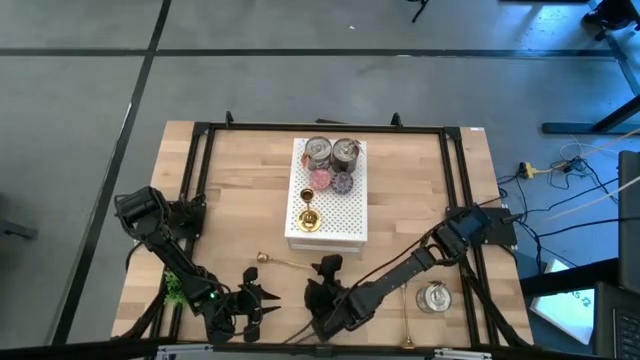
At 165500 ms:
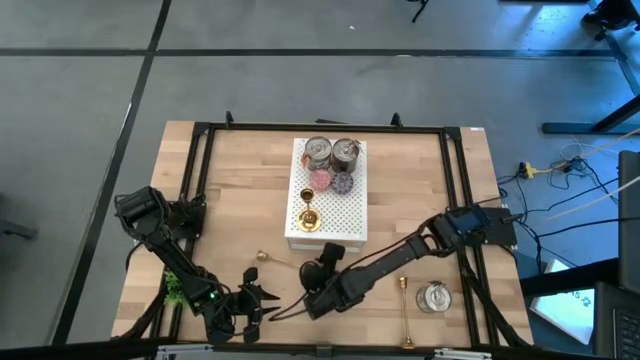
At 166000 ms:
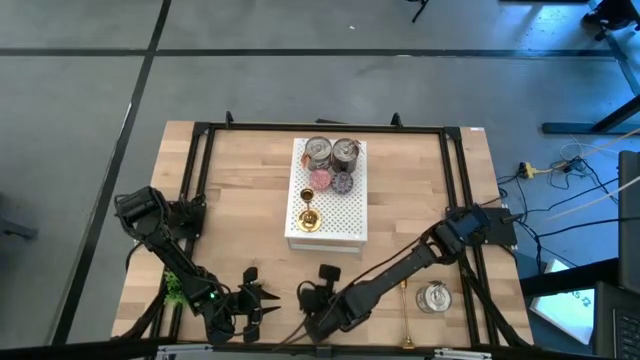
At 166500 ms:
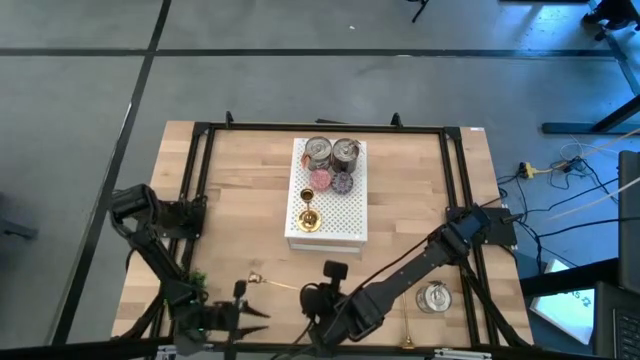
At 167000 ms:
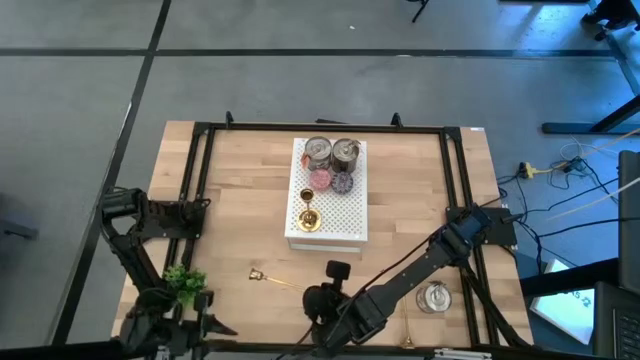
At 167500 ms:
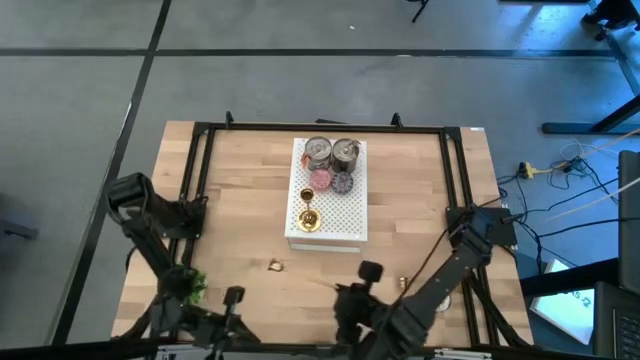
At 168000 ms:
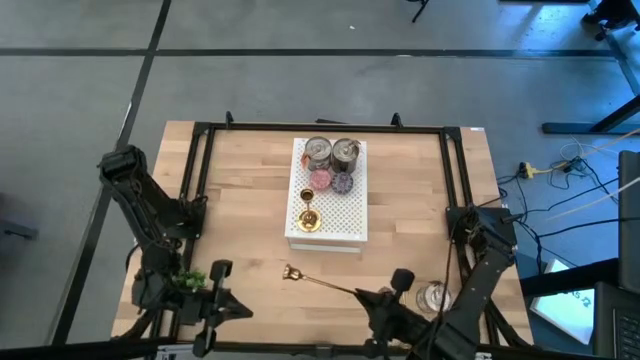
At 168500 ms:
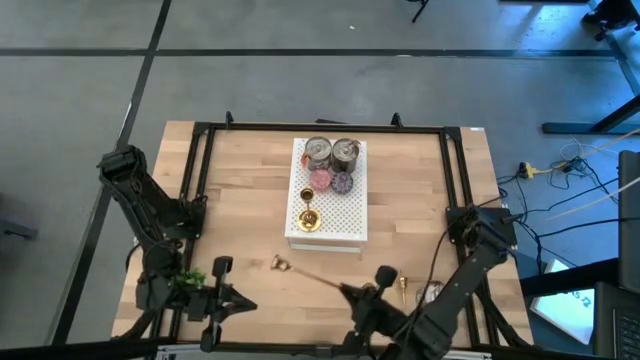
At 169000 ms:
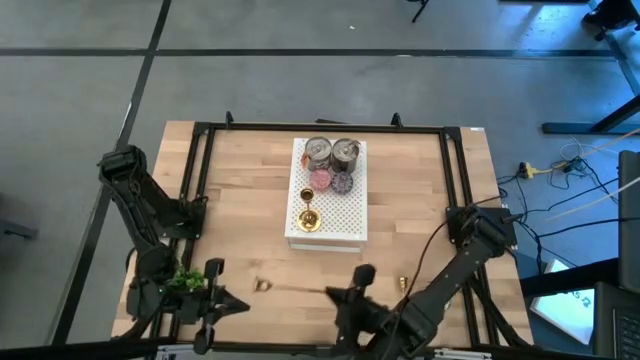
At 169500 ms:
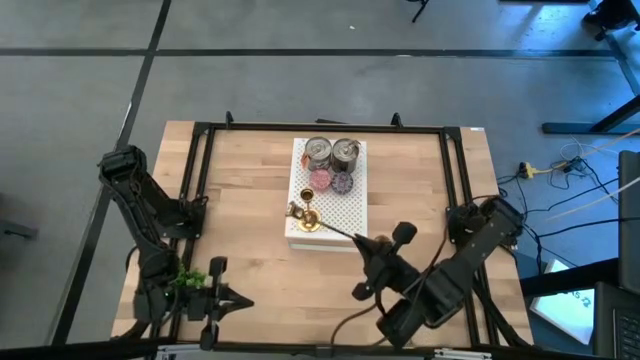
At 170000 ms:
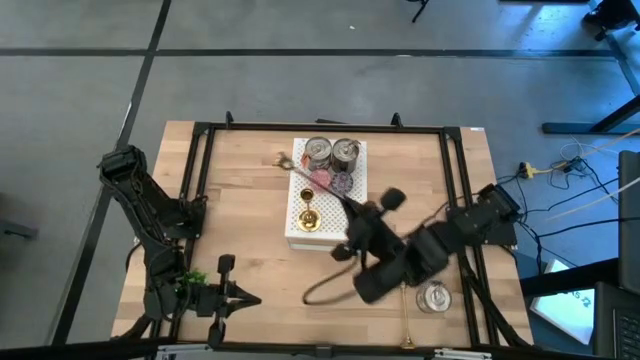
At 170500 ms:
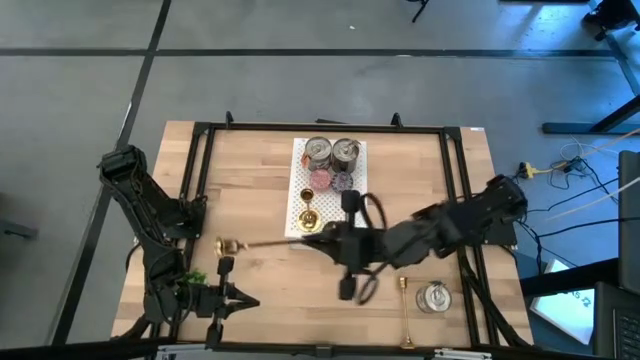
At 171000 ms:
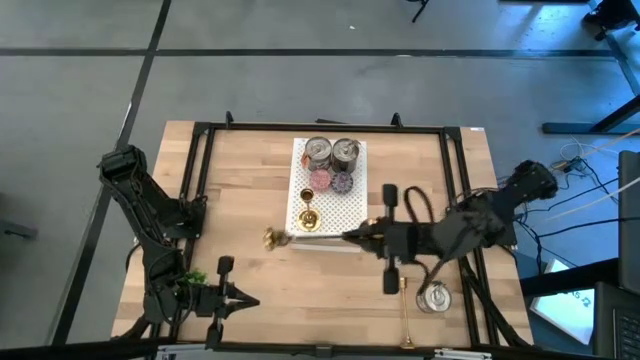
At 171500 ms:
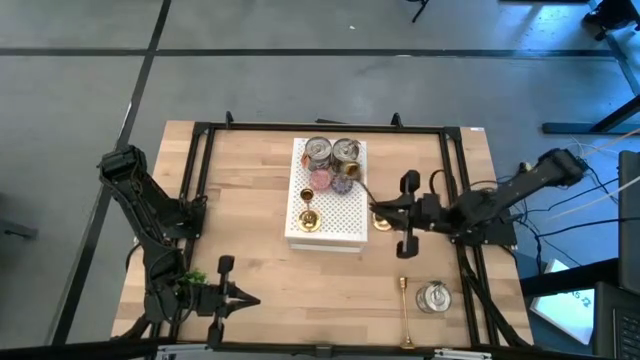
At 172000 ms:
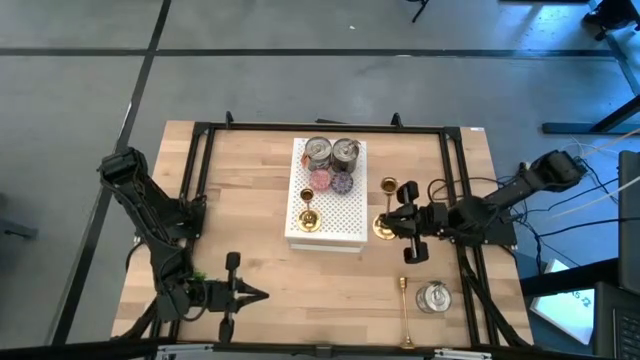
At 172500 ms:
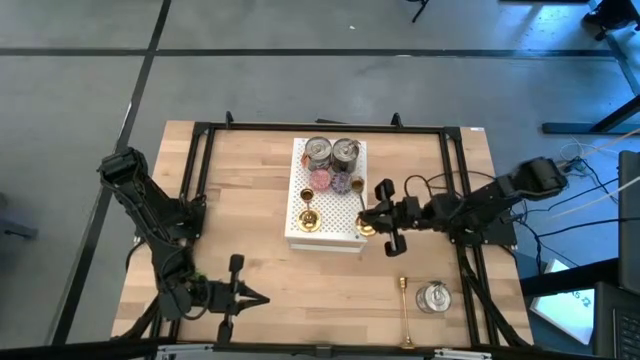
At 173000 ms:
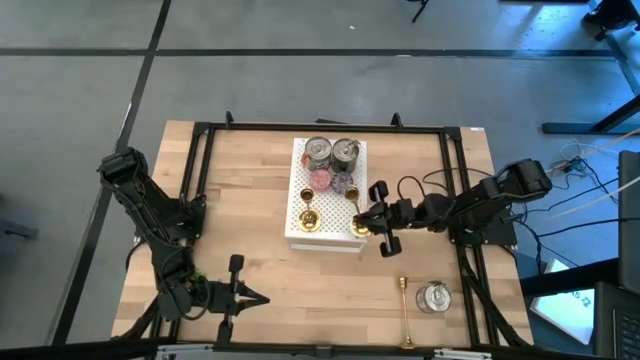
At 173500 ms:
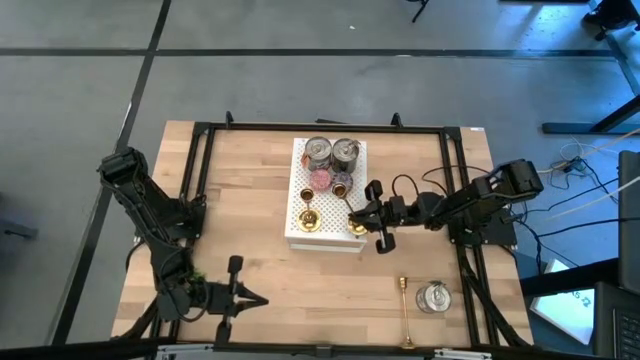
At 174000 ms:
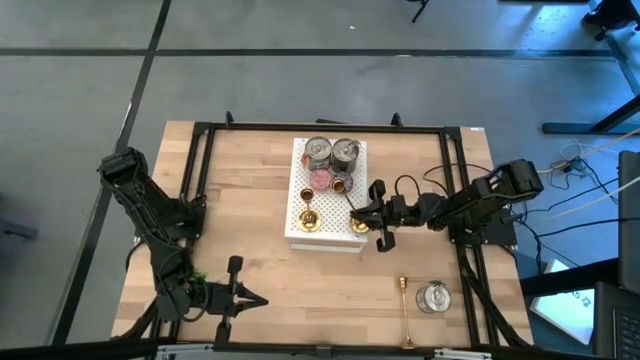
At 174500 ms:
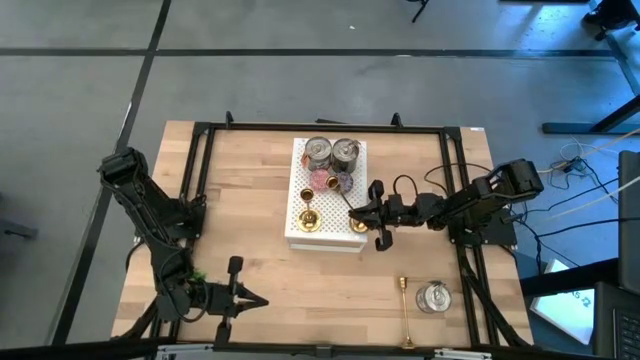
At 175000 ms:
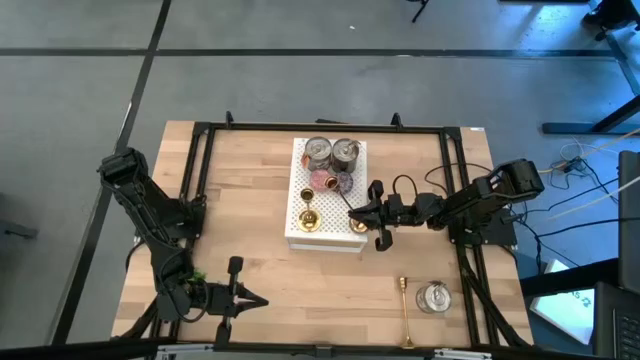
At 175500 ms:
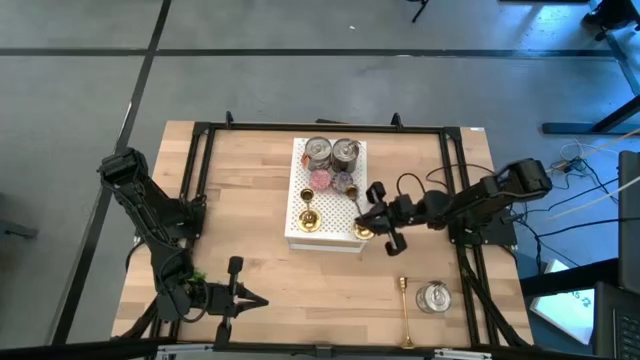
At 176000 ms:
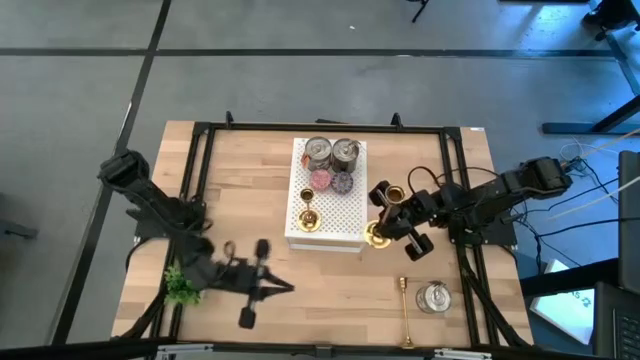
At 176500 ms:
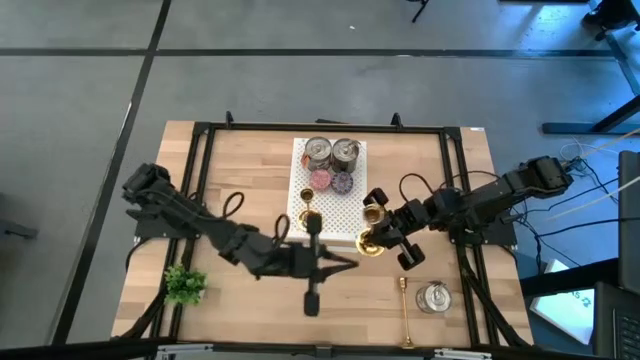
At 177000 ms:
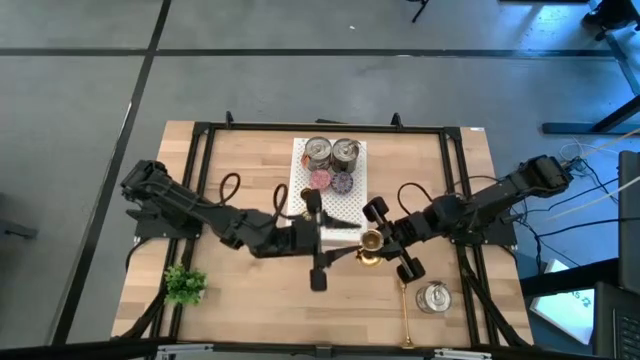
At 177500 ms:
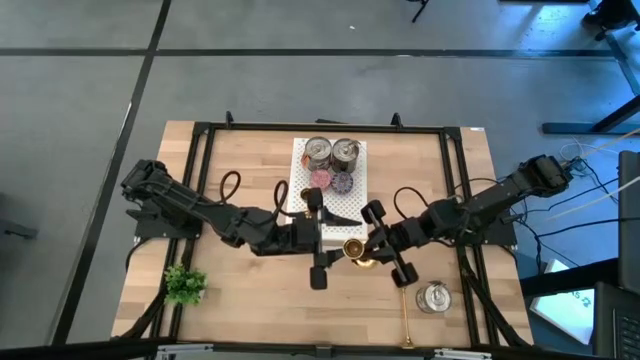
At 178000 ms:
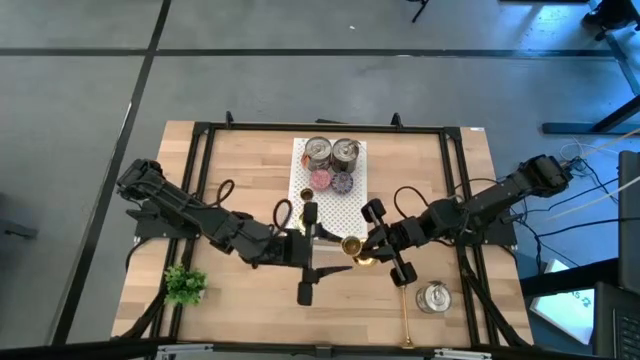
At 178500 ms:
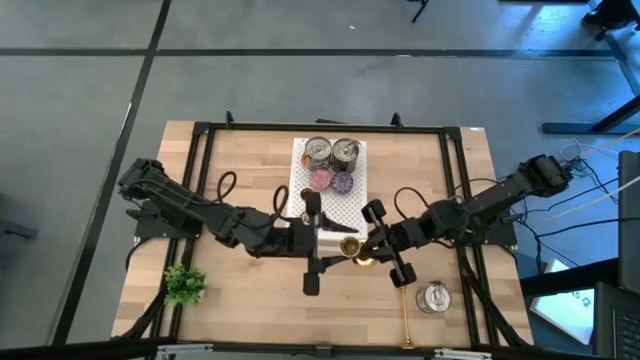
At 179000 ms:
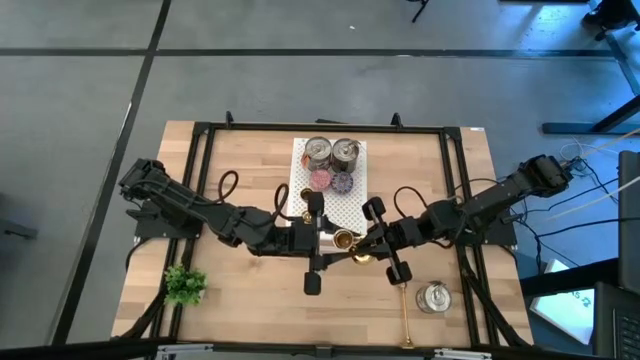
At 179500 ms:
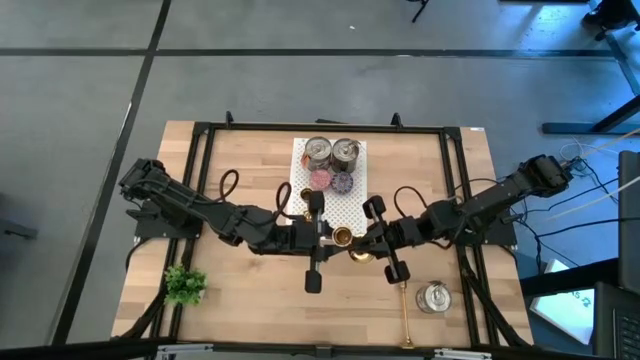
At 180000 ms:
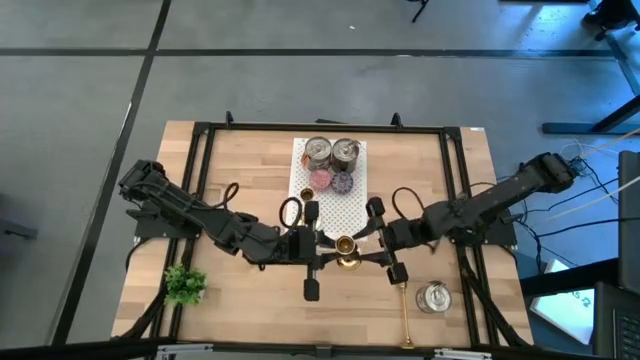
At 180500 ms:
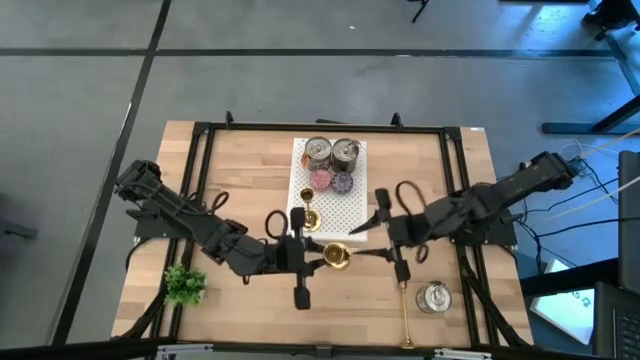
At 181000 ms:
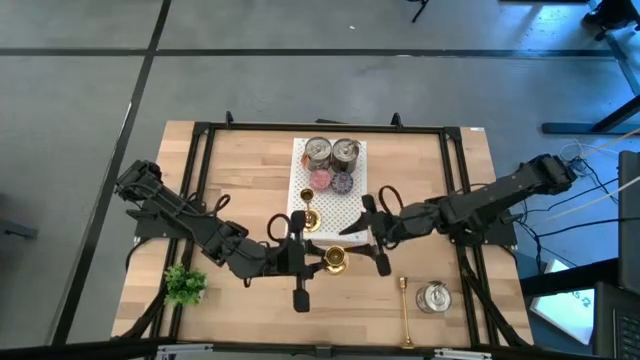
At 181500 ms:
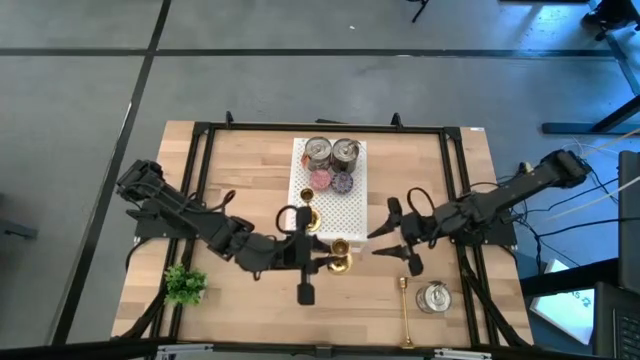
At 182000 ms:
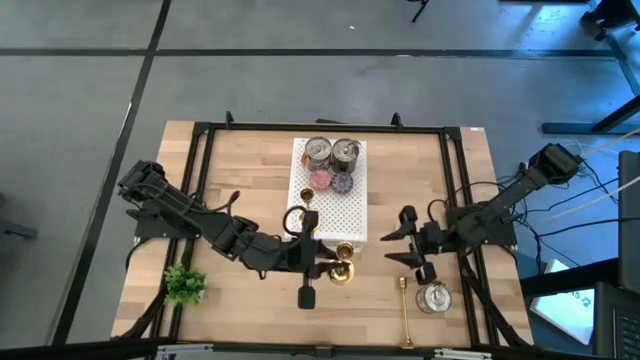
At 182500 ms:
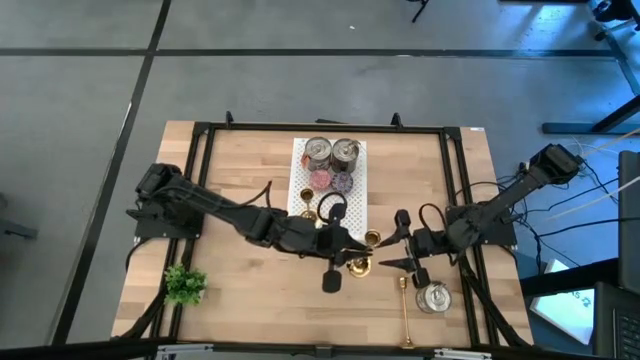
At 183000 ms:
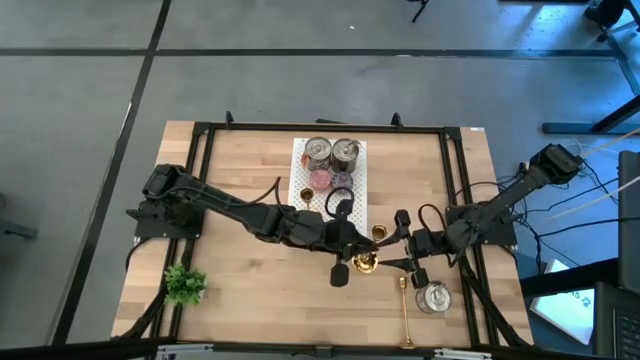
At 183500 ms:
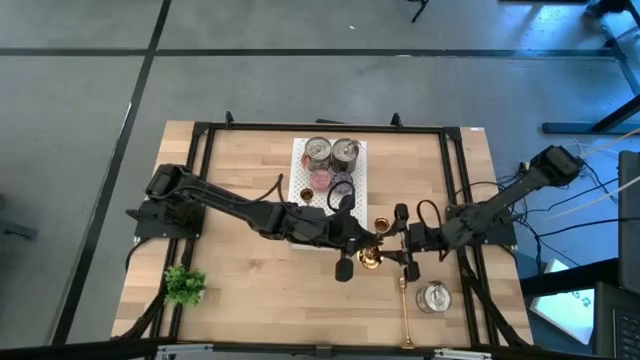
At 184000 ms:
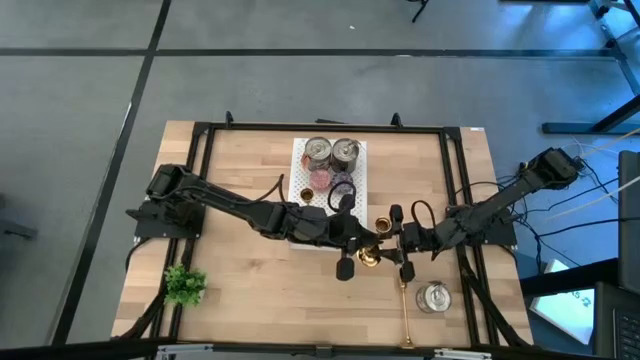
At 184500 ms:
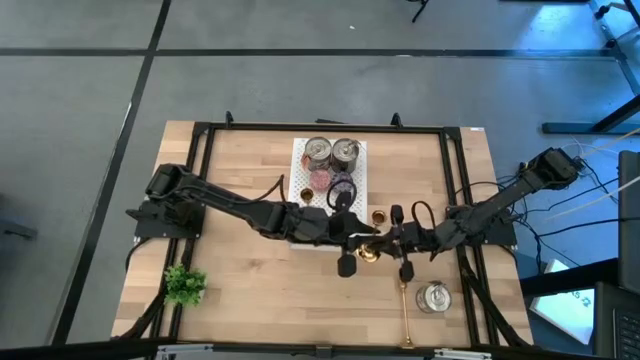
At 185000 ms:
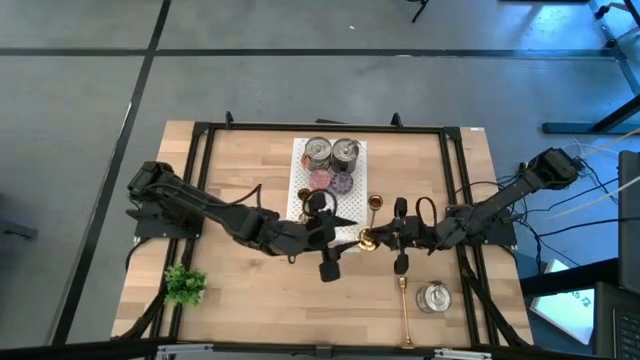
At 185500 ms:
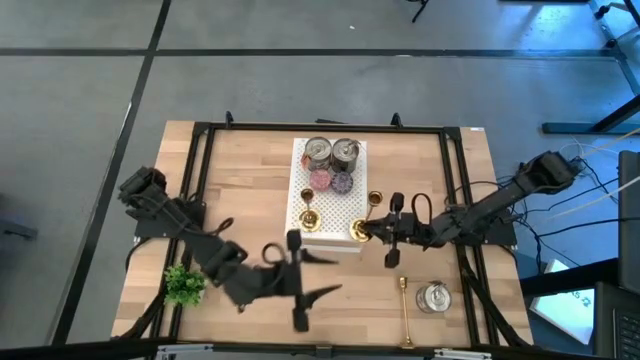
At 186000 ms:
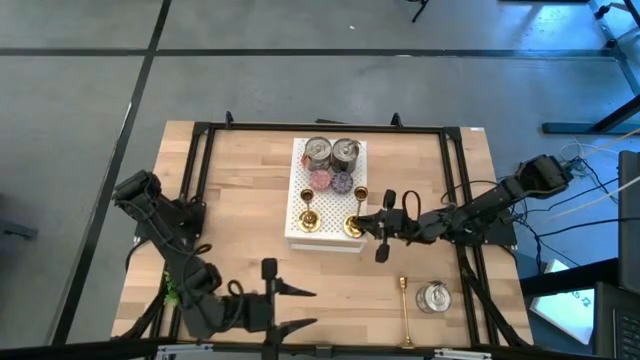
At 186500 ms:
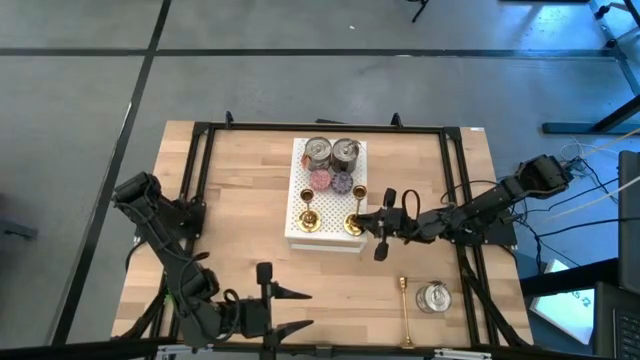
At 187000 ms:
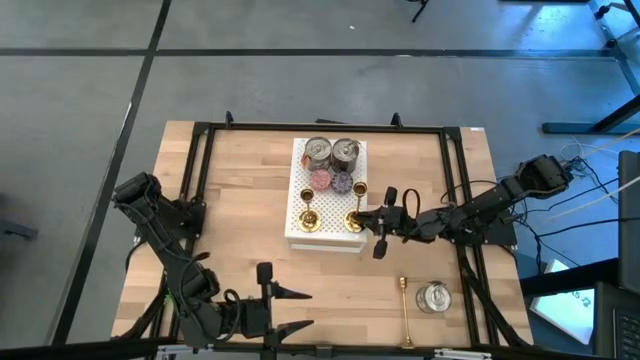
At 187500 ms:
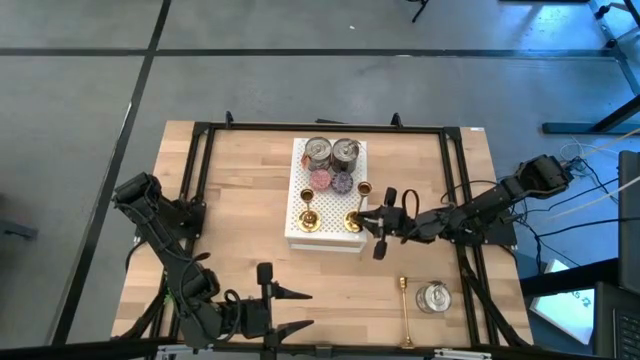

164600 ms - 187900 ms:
Task: Pick & Place candle stick holders
Put the top gold candle holder on the shelf
